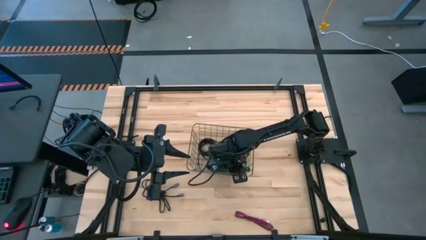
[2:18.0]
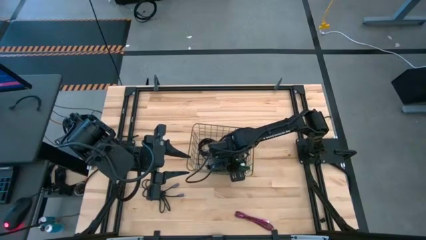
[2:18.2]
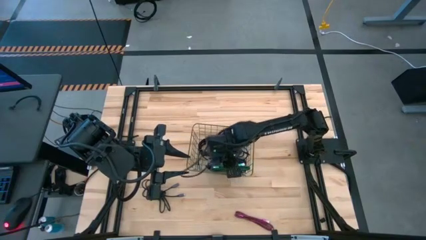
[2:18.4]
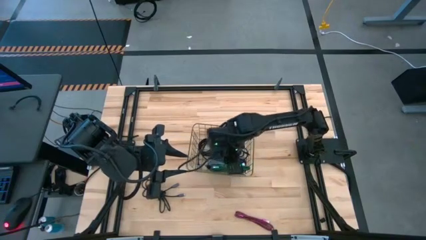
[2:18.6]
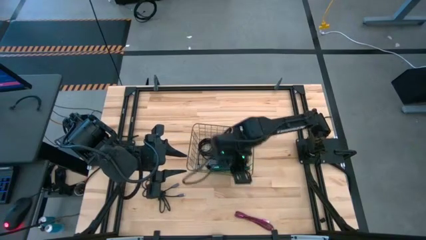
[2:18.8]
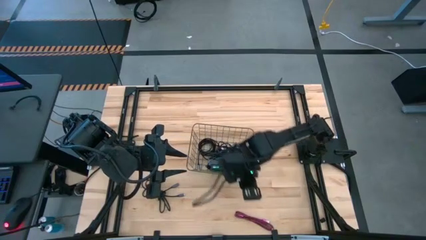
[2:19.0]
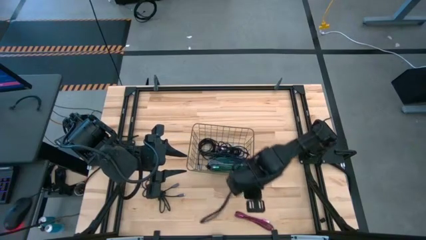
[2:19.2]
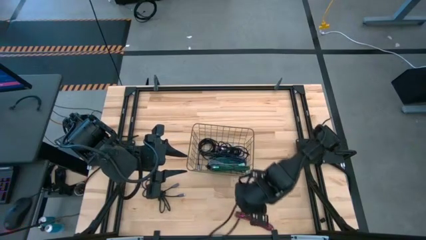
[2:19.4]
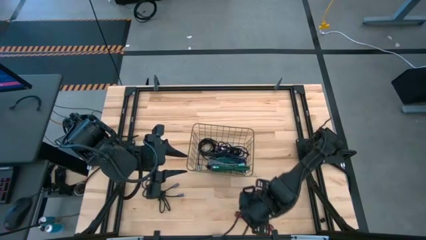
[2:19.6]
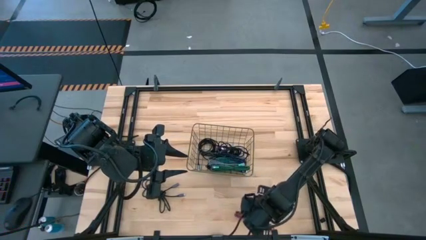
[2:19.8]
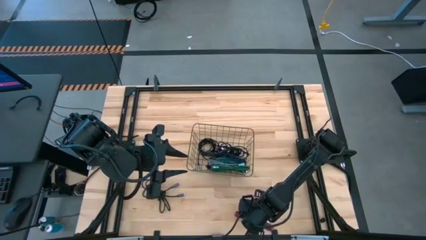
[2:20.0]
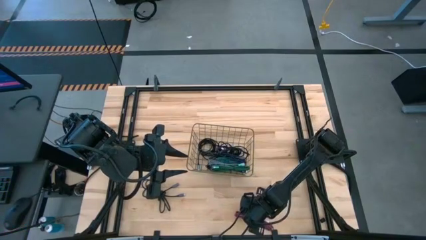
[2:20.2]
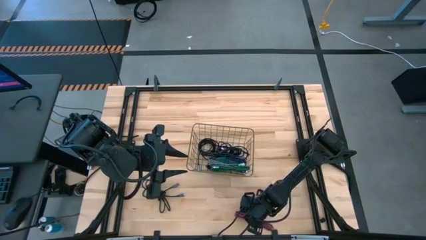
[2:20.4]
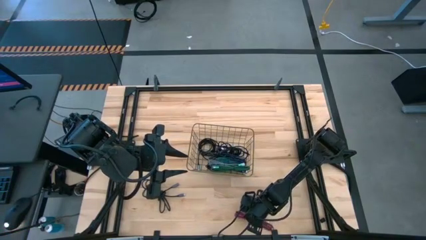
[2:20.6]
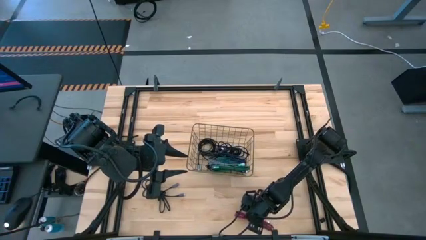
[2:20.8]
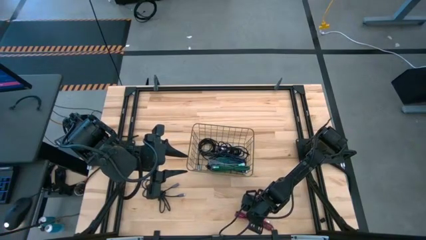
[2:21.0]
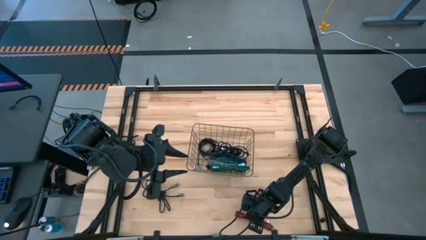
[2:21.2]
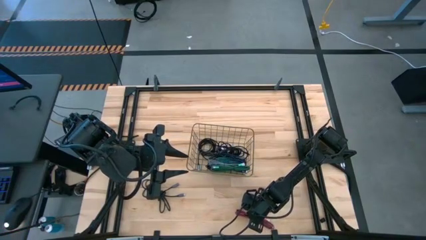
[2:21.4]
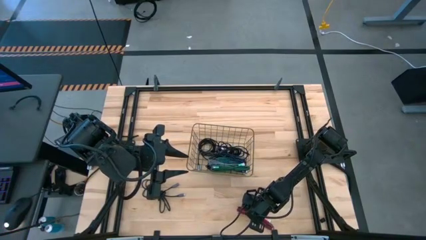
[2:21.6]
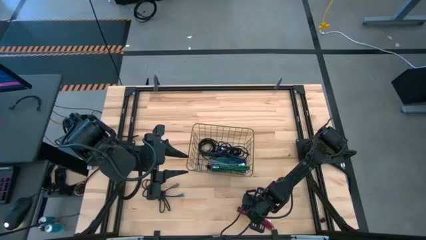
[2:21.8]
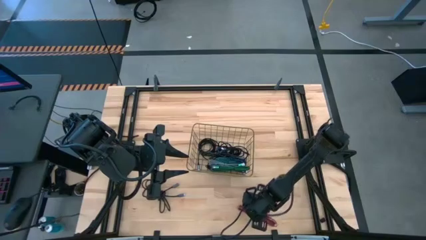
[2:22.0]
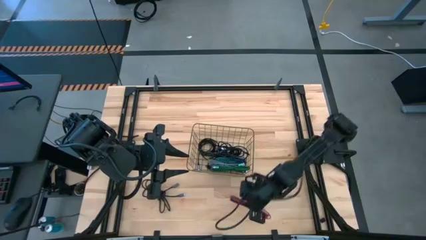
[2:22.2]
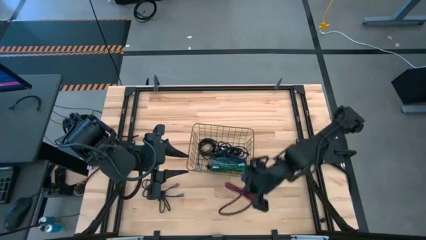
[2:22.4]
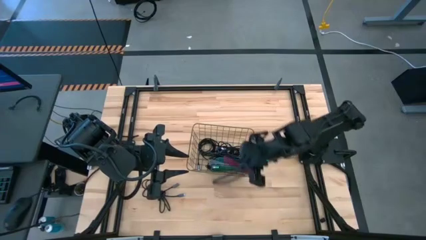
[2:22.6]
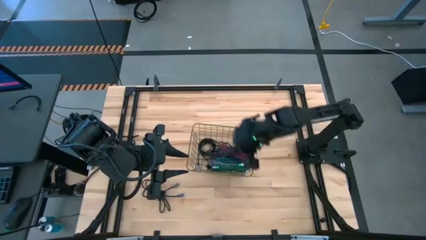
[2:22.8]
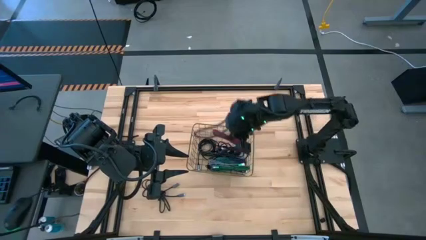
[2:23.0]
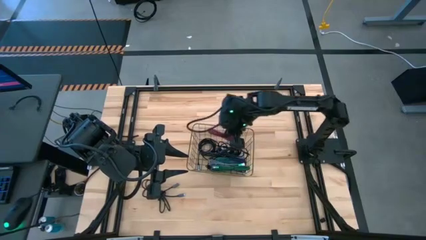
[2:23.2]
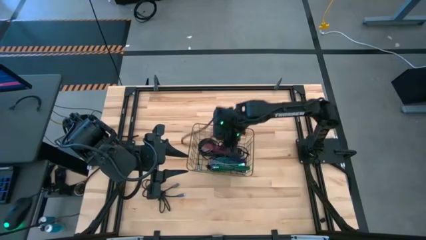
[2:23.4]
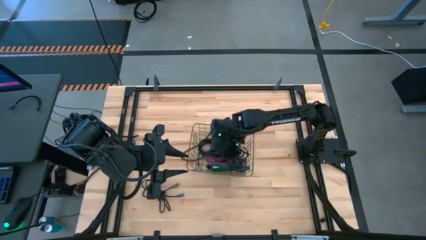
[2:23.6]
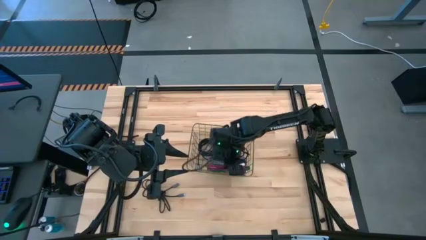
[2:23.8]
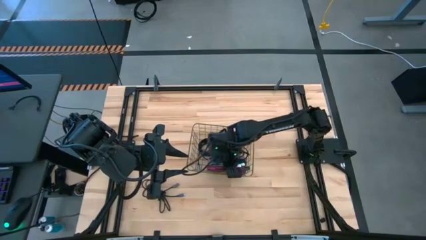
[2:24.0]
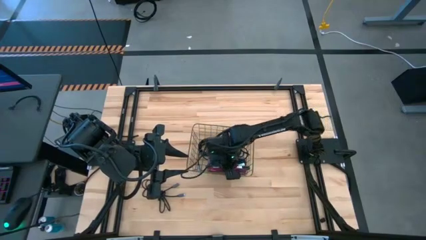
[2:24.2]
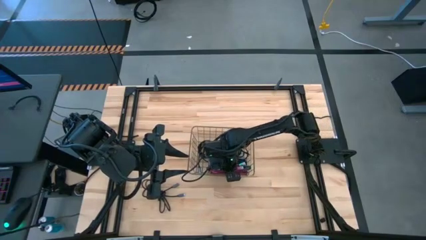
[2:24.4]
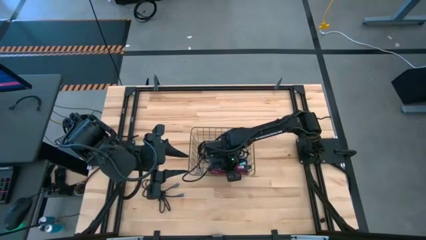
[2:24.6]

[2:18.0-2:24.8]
Task: Pick and place USB-C Cables
Put the pink charger cable into the wire basket

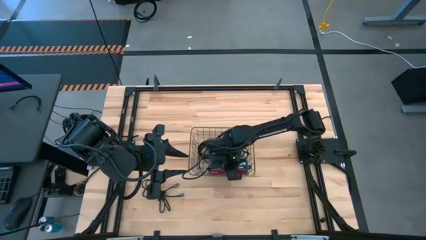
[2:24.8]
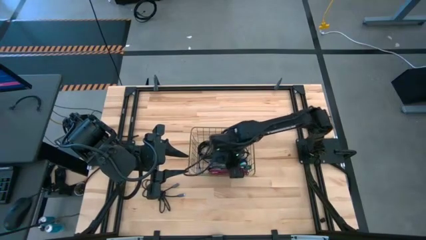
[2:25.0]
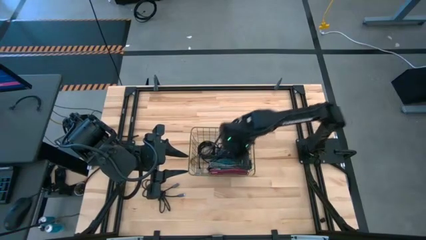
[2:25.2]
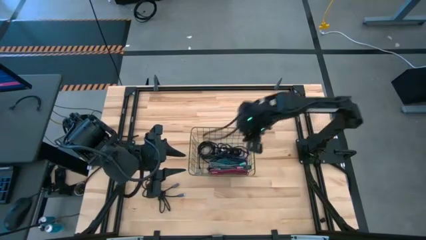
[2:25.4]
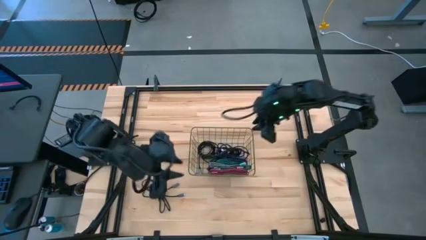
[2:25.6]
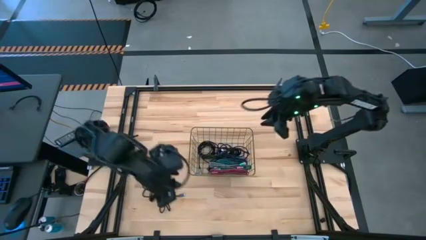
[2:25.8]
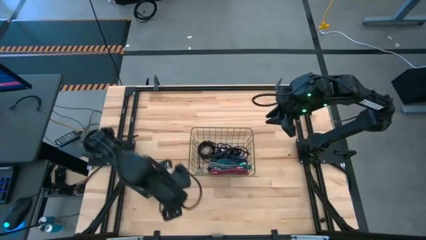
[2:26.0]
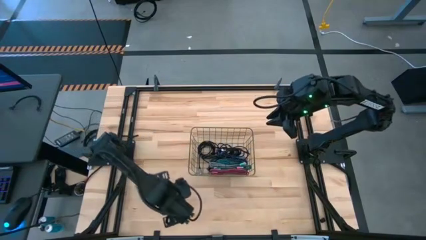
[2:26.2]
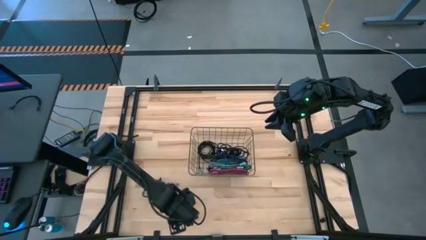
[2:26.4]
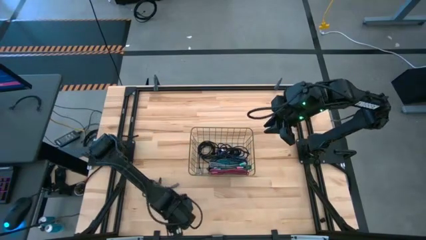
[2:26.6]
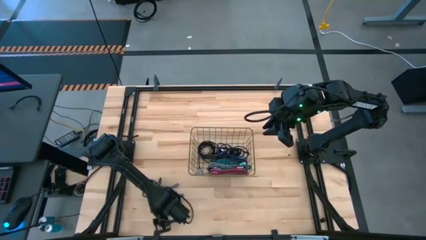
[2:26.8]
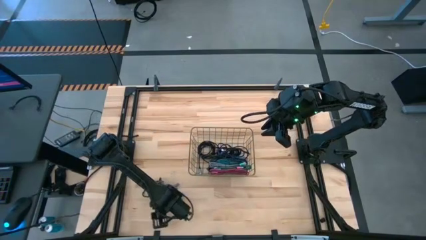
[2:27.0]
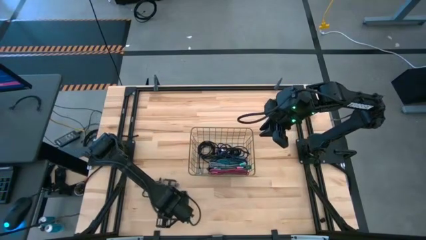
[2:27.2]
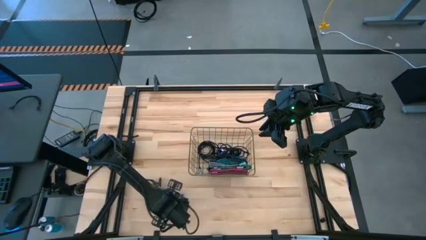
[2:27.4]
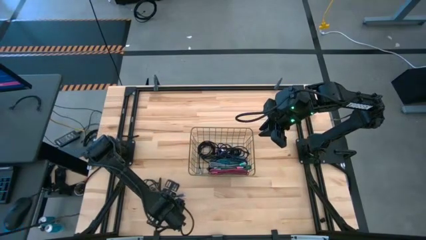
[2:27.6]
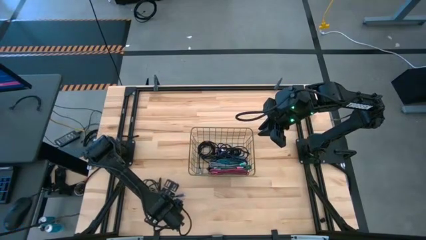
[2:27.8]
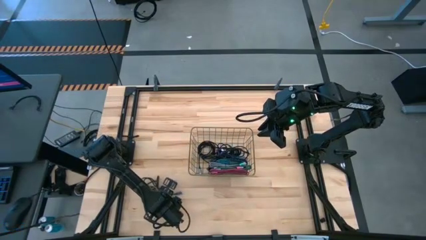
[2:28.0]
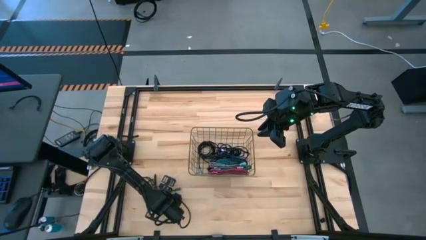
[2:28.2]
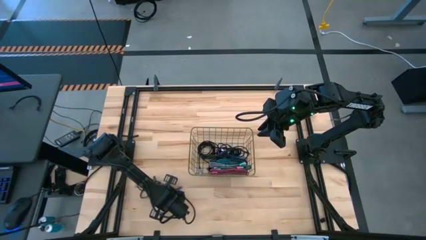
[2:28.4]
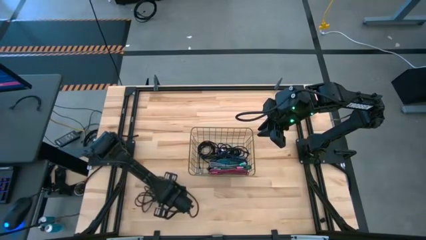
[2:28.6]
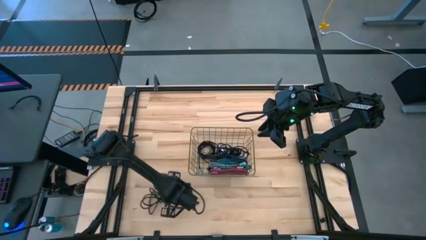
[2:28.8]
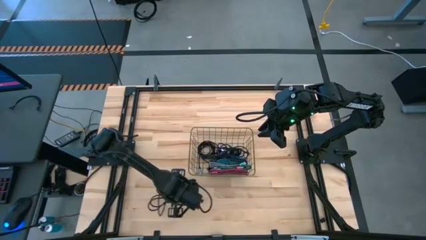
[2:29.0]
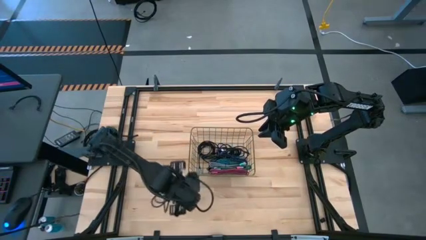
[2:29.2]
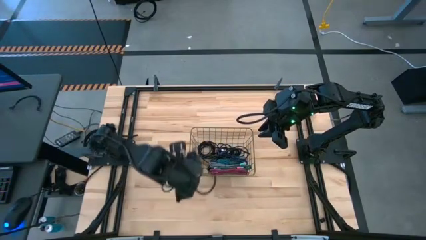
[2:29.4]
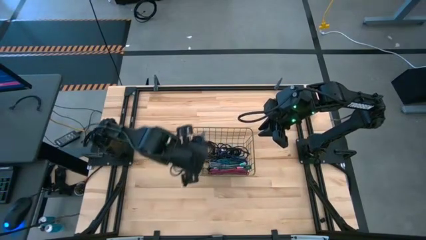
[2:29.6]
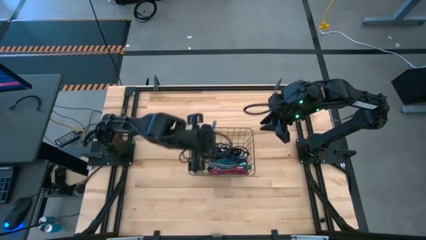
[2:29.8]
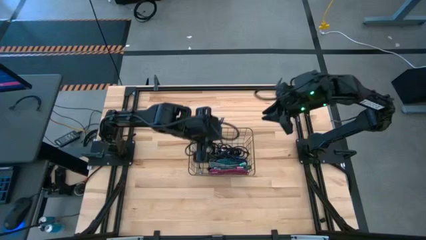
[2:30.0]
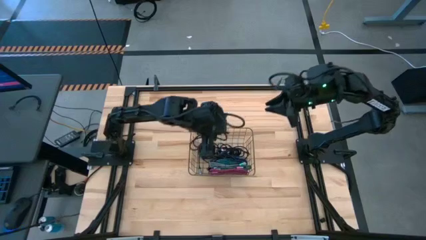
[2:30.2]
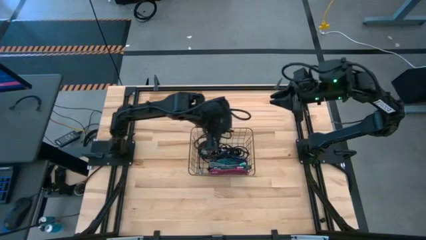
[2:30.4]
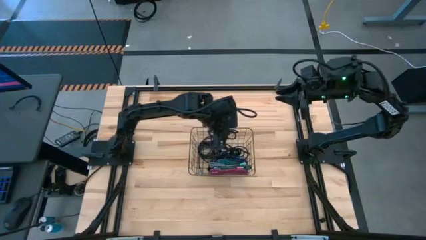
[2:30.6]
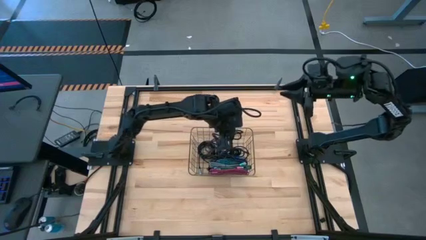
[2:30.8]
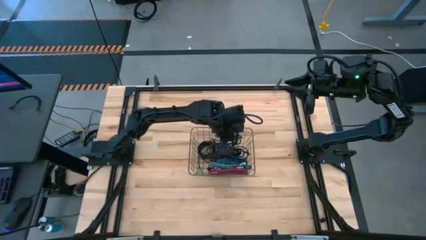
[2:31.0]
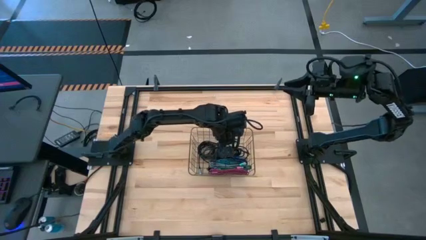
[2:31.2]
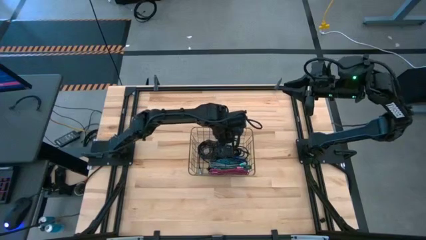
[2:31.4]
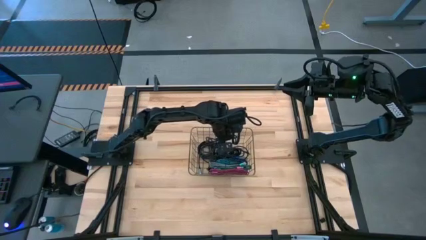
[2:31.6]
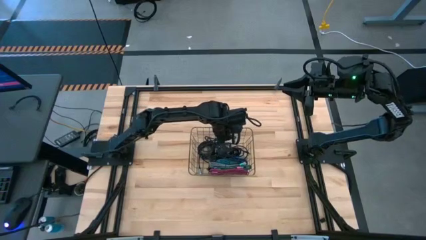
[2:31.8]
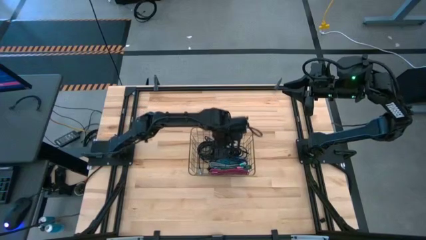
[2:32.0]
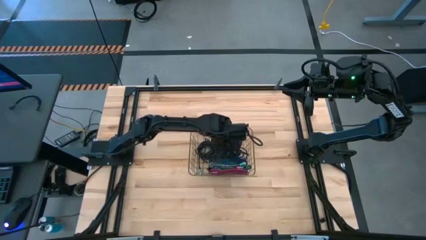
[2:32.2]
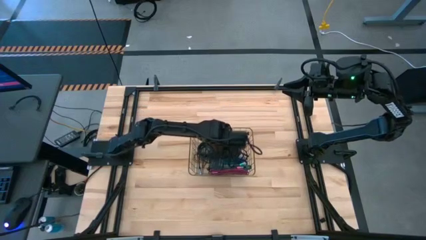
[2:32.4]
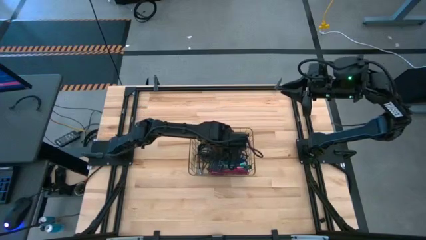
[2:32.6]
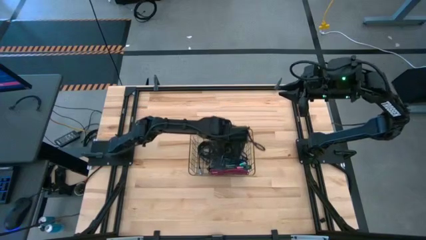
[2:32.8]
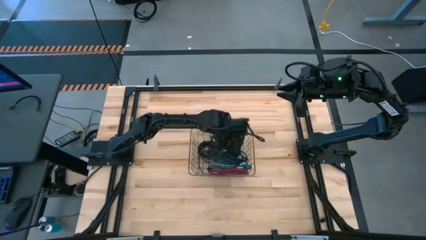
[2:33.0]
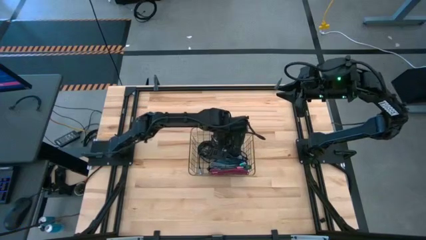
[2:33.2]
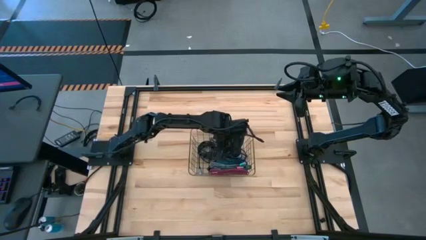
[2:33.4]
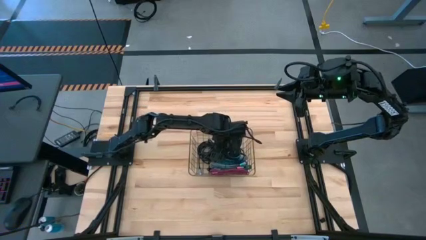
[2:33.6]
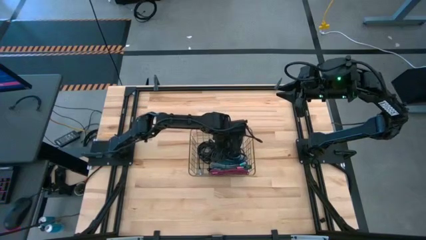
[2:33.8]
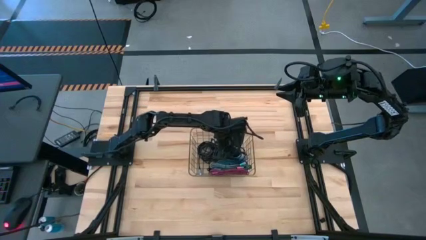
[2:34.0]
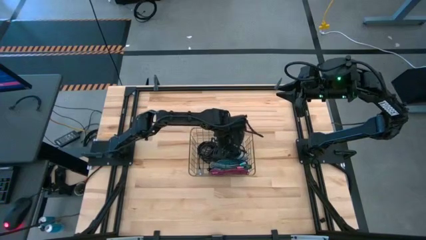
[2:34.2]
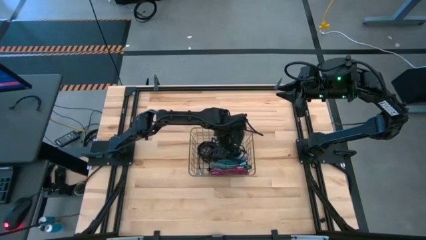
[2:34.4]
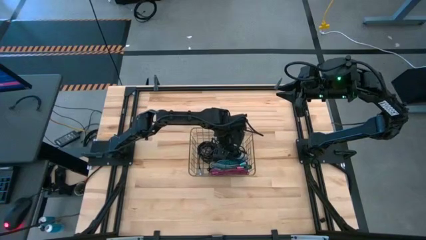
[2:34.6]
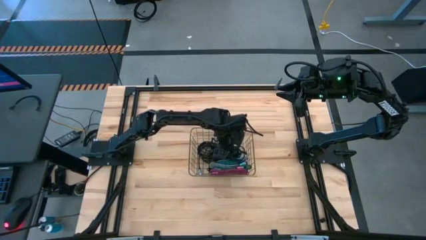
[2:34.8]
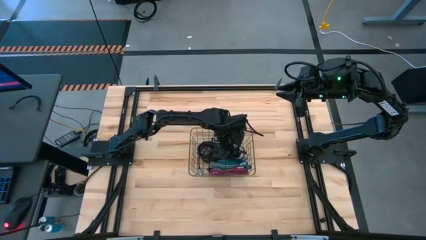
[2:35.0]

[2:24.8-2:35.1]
Put the black charger cable into the wire basket
